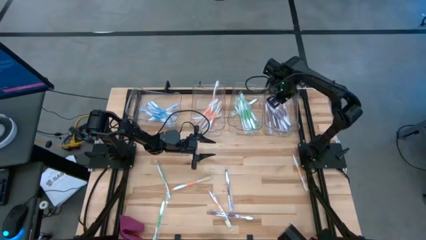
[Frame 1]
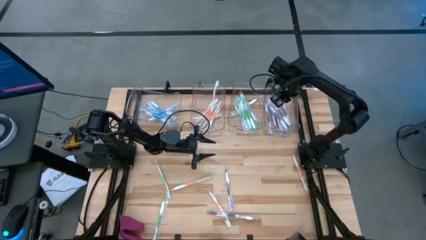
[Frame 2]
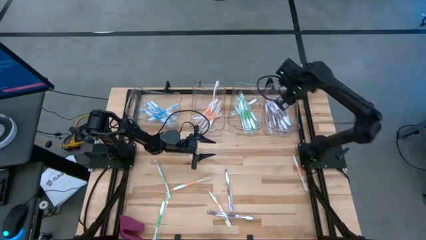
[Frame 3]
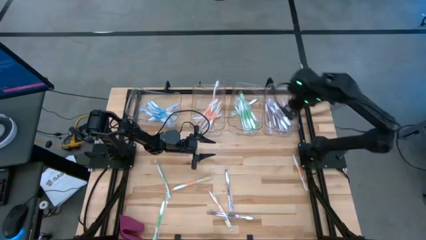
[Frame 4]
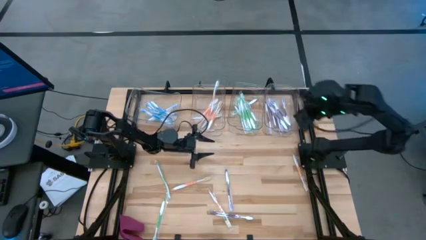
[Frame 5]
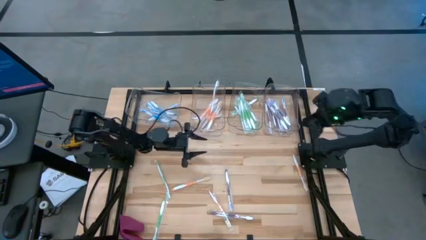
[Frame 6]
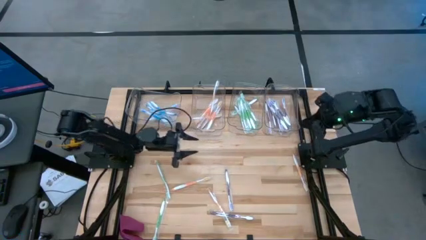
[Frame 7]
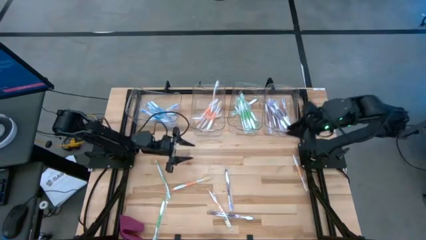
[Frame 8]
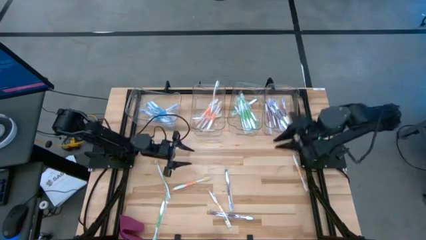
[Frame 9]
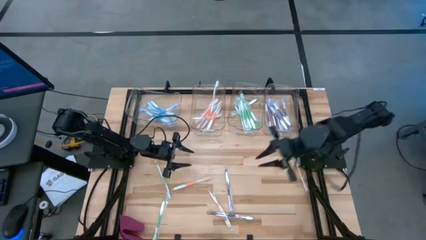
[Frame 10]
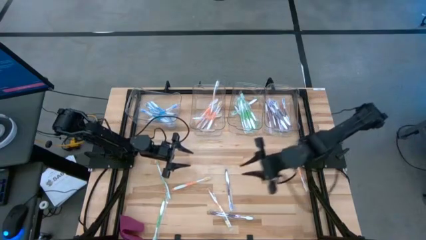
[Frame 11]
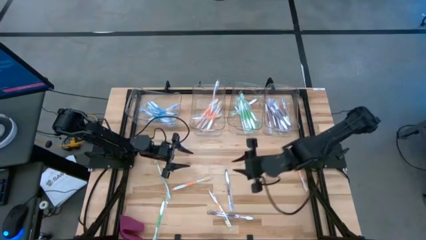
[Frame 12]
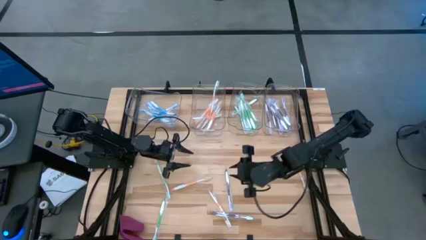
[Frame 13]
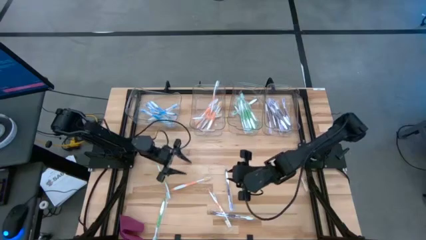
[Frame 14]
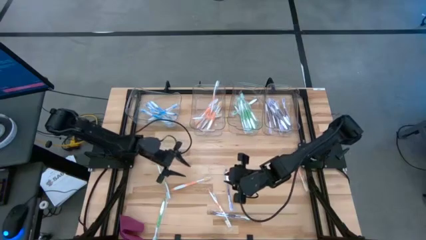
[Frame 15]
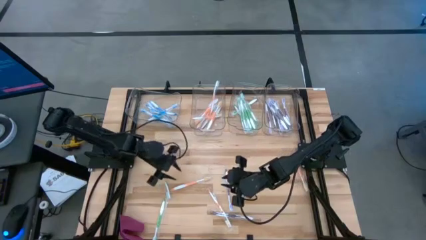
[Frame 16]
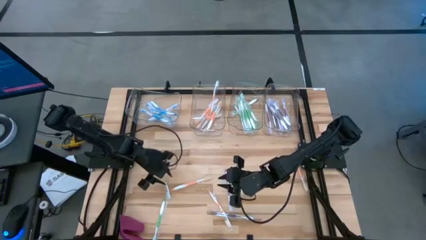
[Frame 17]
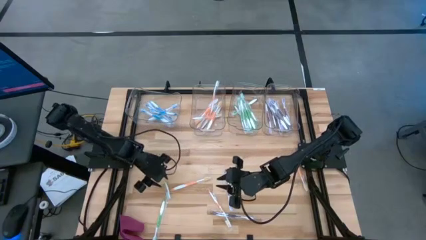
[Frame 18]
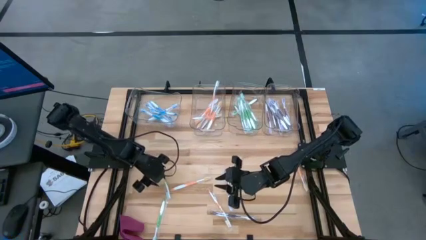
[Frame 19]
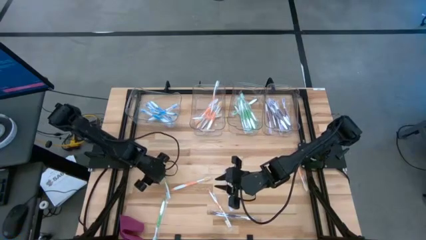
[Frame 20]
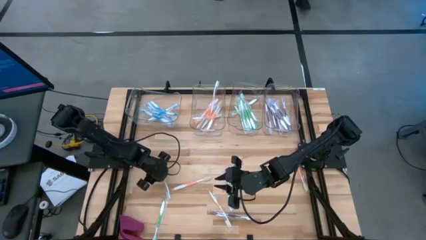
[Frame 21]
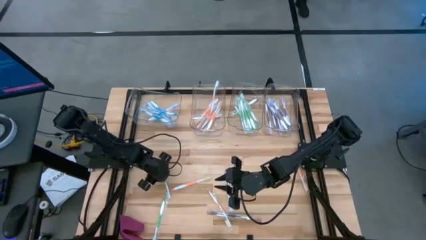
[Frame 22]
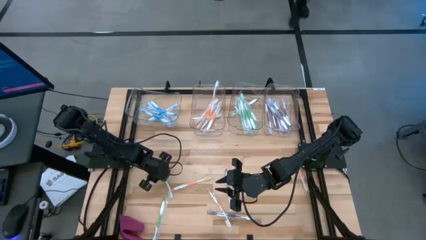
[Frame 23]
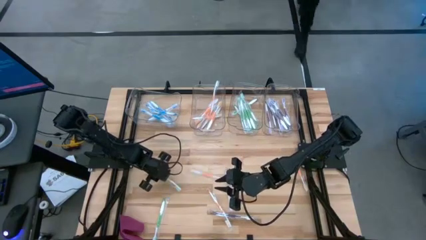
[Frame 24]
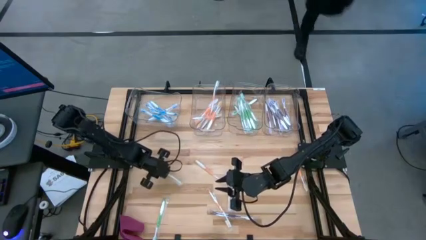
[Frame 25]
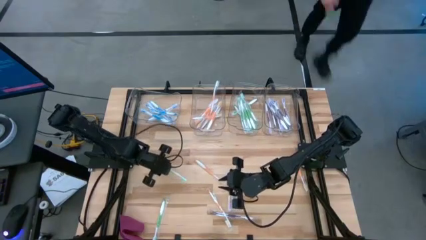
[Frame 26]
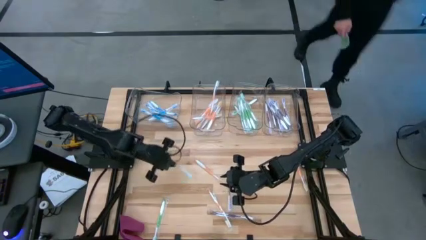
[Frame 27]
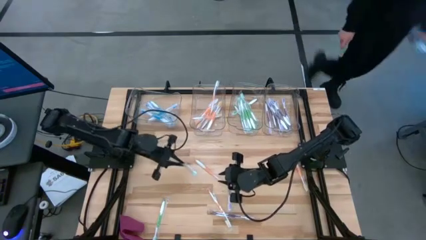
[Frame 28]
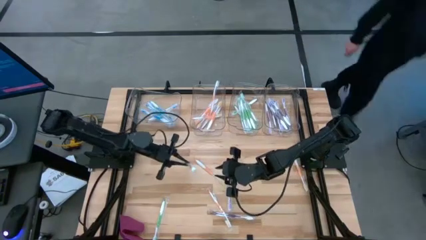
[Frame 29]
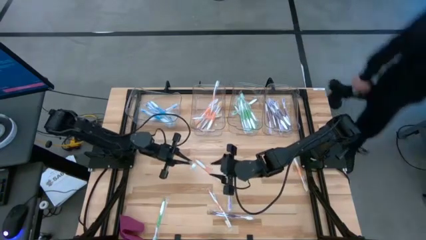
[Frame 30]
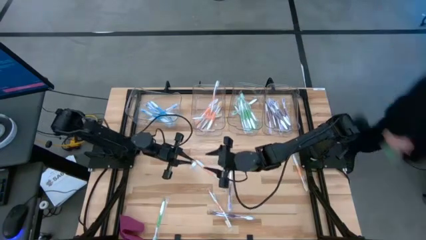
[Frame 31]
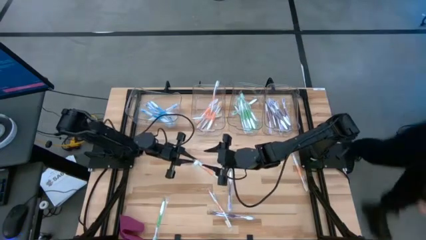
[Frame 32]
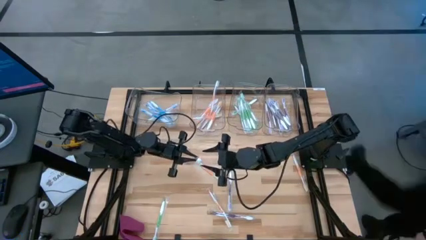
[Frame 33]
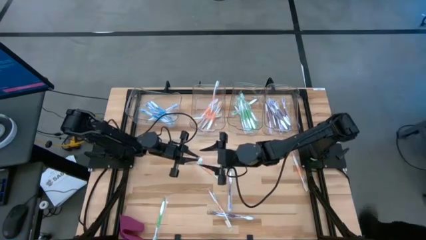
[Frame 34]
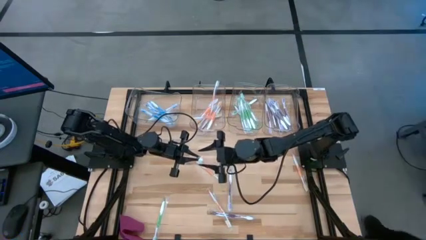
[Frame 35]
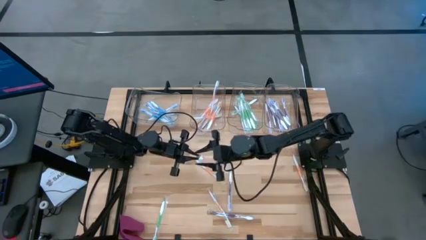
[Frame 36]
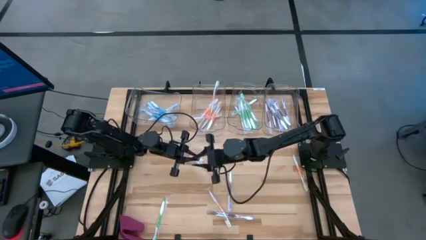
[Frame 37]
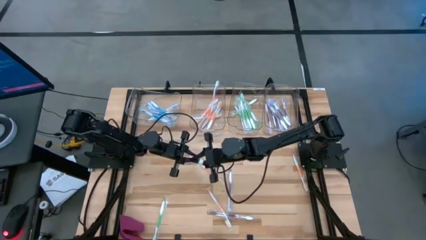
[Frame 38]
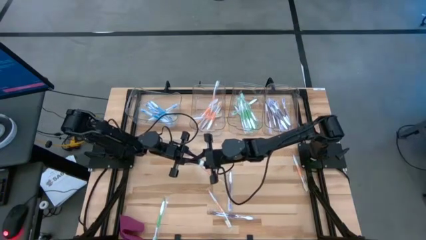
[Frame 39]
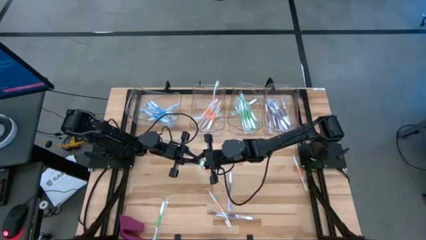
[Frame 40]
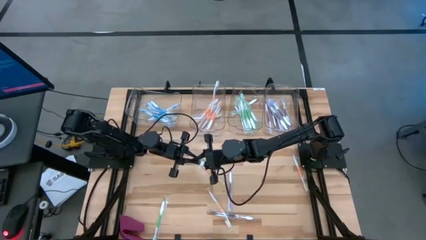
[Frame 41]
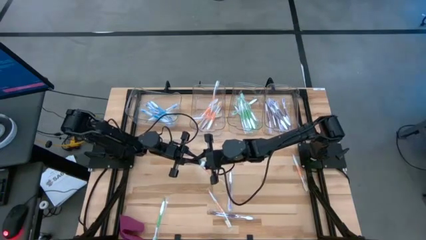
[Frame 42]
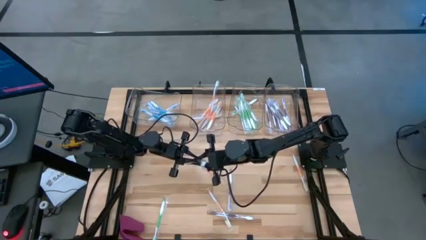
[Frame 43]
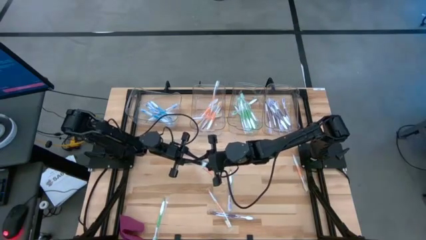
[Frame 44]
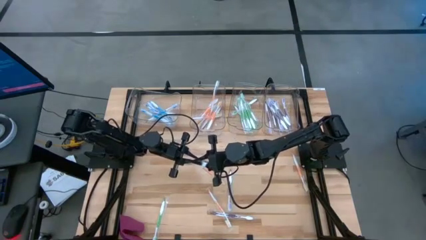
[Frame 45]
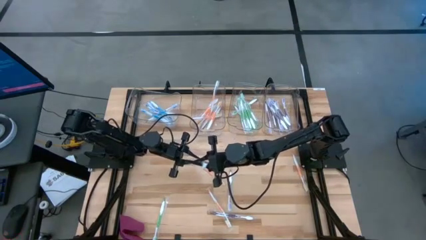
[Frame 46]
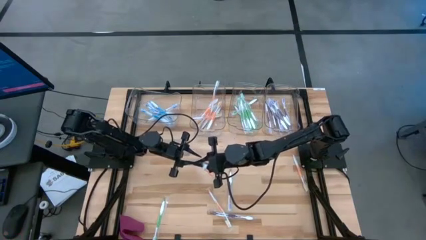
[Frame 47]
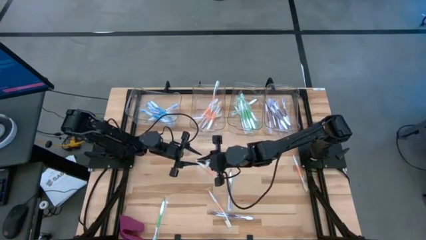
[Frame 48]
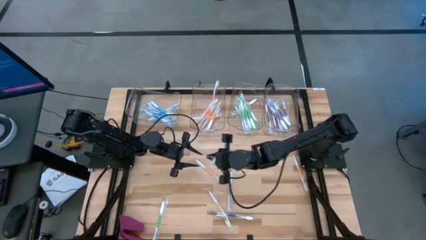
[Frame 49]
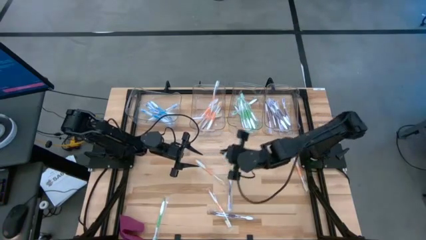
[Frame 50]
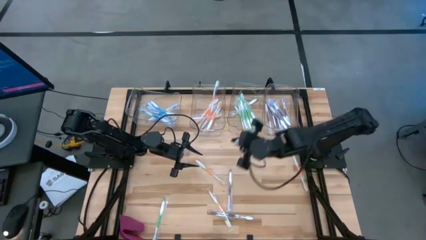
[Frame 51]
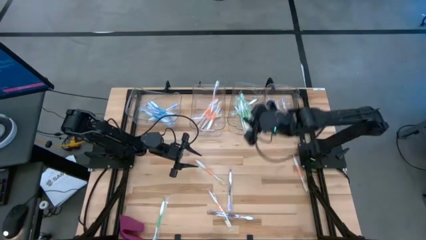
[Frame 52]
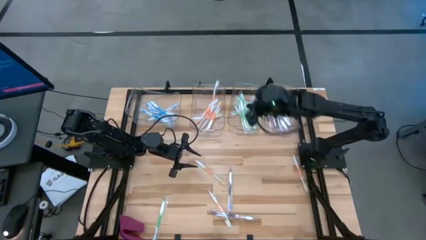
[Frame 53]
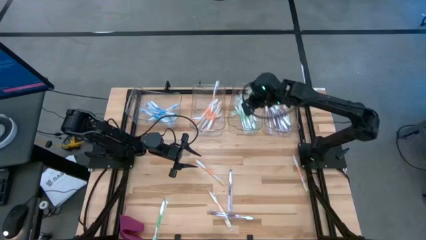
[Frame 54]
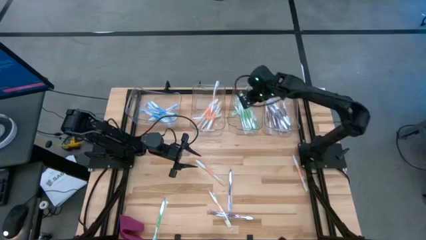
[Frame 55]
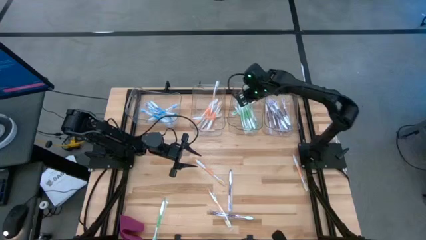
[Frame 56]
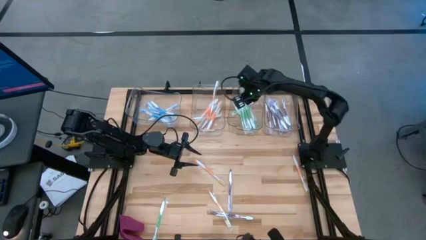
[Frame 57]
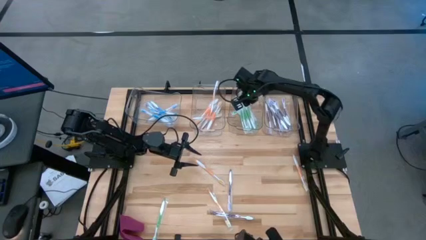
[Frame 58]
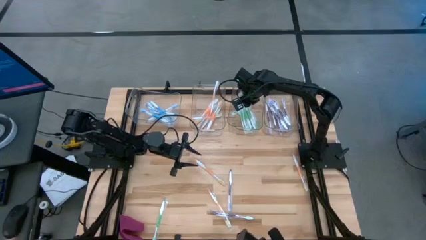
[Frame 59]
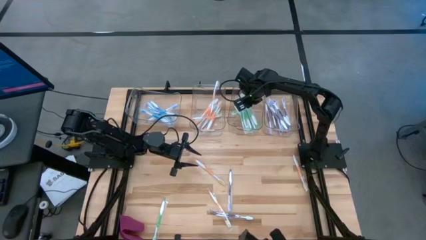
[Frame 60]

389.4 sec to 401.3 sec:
Task: Pick & Place Toothbrushes
Put the green toothbrush into the middle right transparent bin

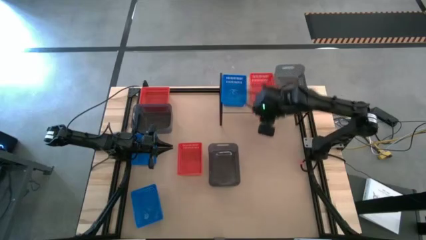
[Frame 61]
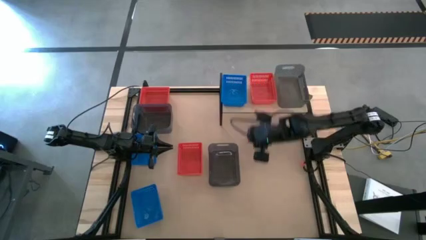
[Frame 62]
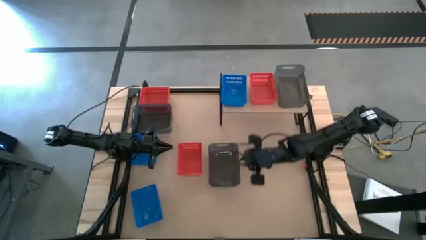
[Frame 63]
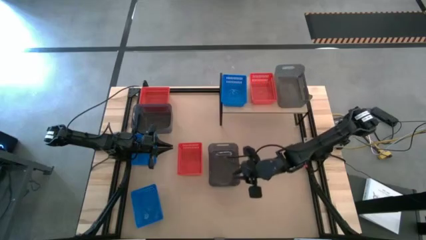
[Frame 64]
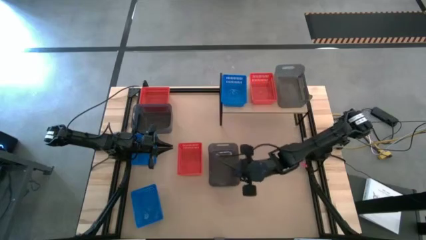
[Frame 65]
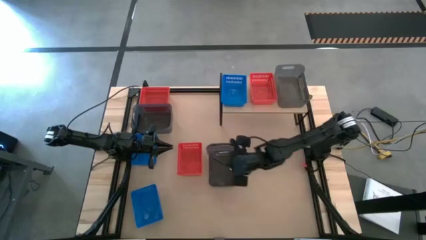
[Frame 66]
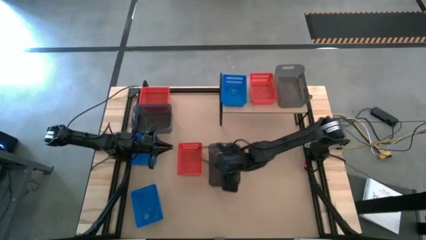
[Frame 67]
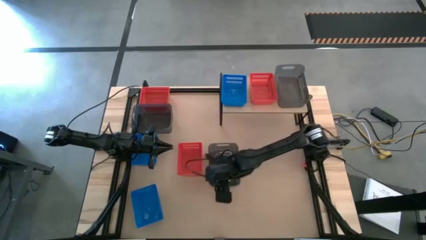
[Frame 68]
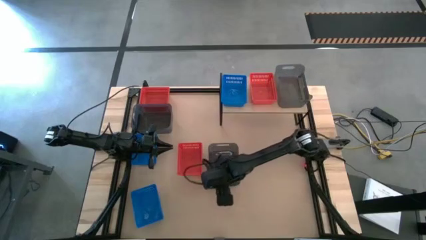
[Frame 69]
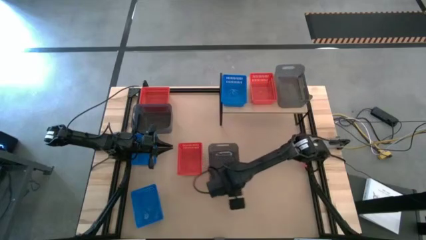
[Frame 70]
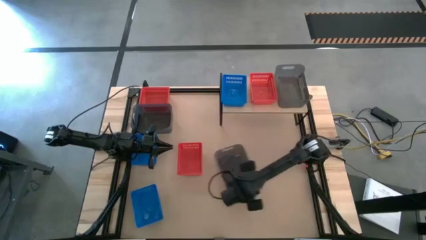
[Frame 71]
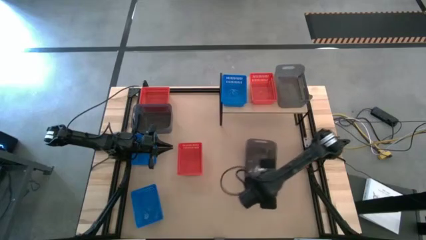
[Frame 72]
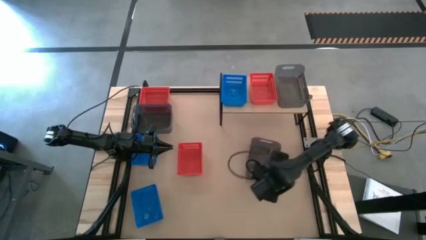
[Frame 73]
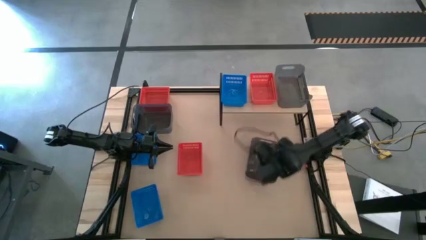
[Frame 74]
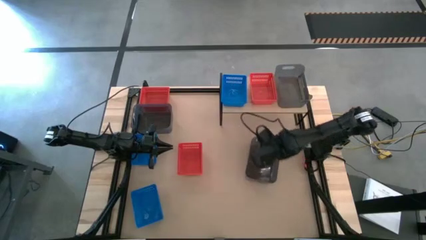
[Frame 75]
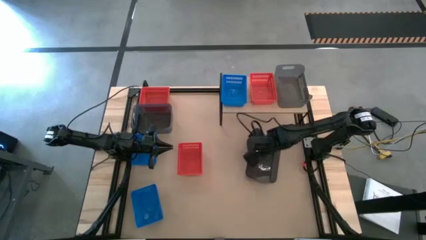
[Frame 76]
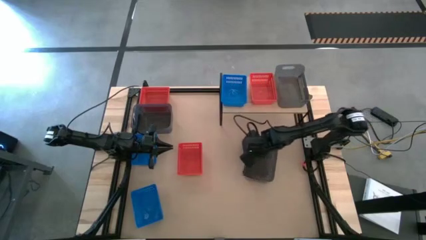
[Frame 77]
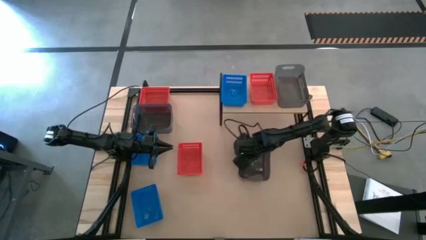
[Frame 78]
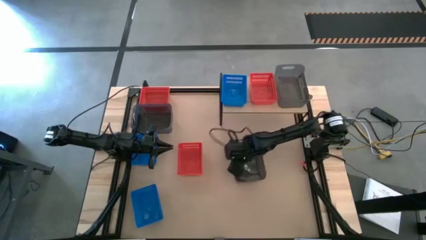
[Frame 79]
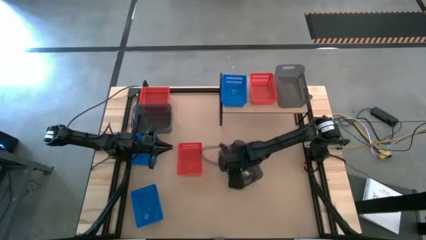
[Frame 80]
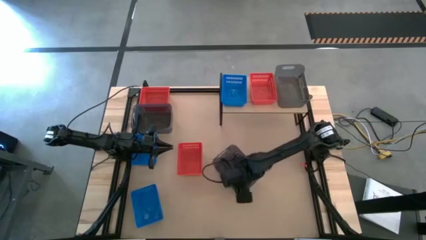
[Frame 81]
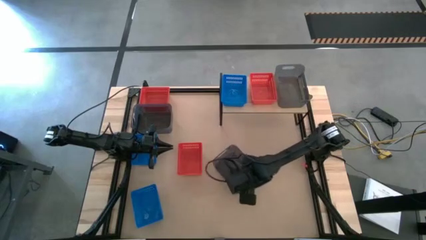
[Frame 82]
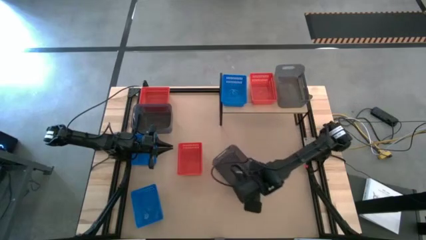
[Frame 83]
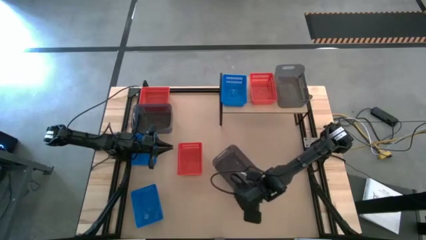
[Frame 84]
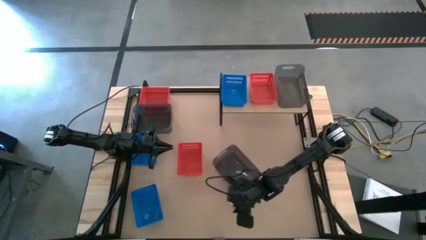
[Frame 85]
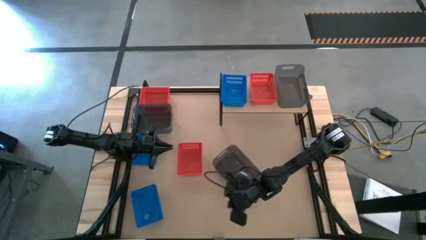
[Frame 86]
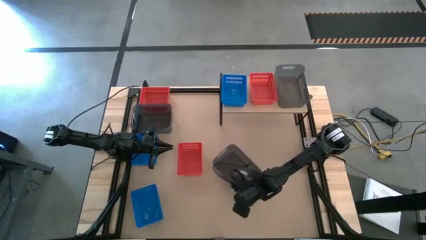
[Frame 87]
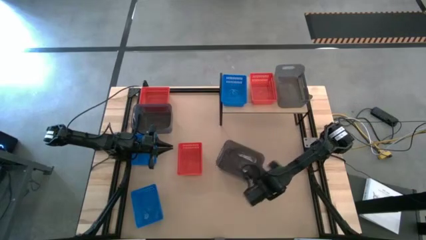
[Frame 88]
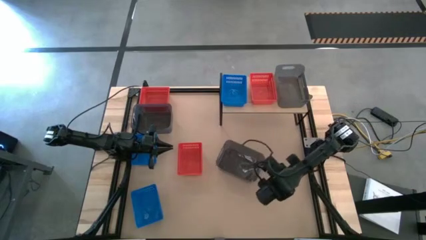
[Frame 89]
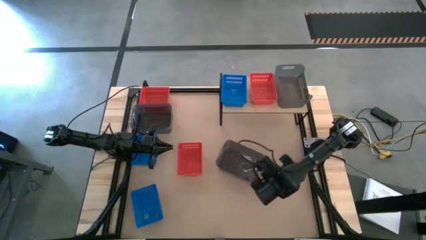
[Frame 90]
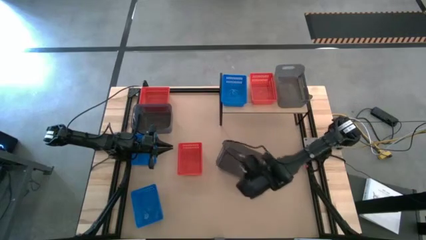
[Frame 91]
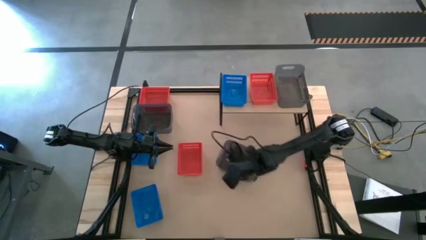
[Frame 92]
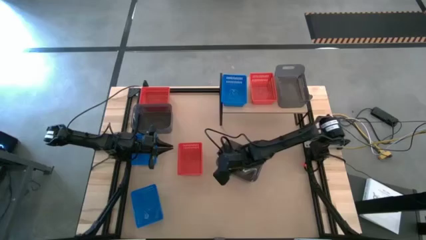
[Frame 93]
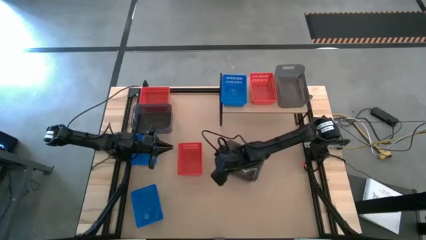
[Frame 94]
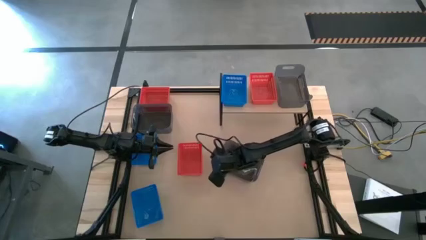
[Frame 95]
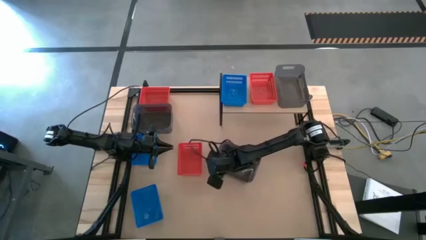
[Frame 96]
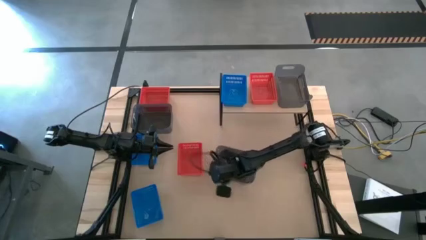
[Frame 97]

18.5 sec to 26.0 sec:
Task: Stack baskets on shelf by color
Stack the right black bin on the other black bin on the shelf
